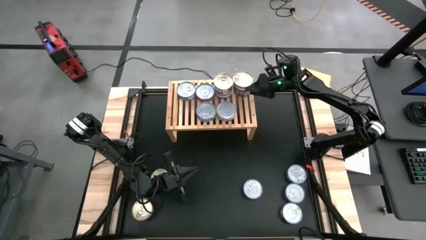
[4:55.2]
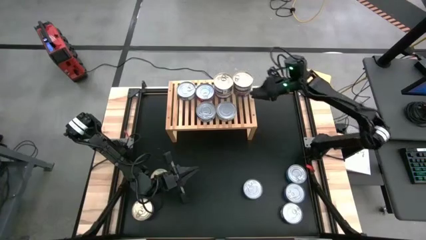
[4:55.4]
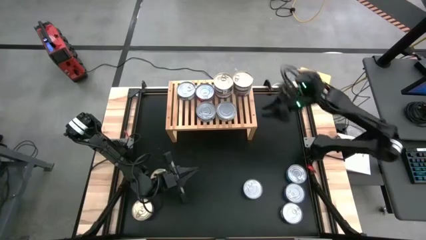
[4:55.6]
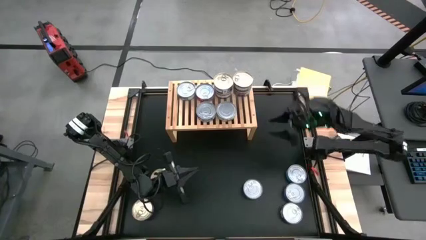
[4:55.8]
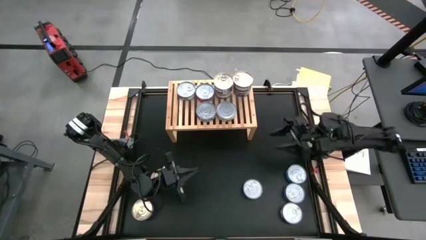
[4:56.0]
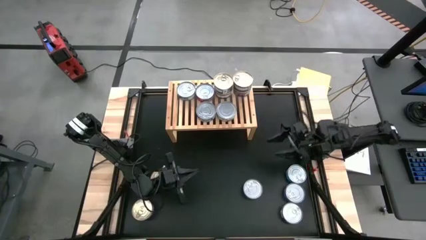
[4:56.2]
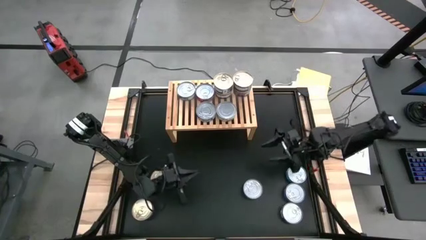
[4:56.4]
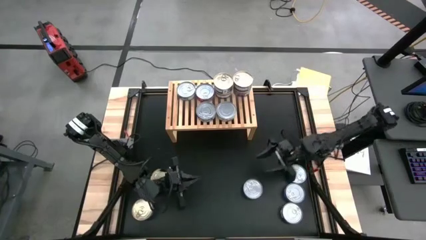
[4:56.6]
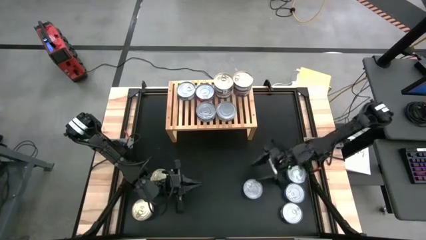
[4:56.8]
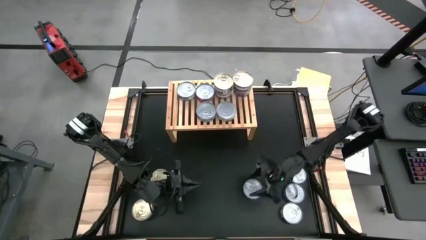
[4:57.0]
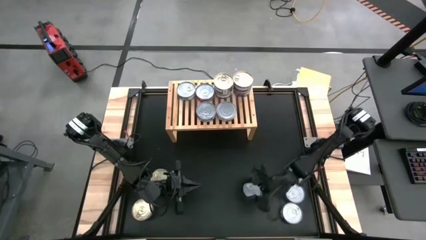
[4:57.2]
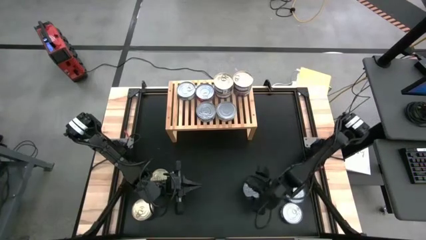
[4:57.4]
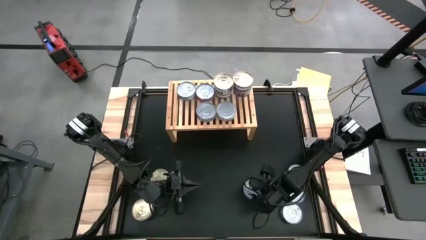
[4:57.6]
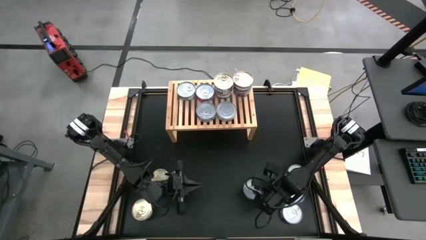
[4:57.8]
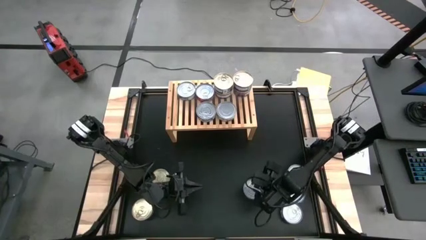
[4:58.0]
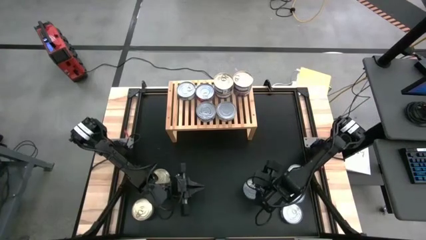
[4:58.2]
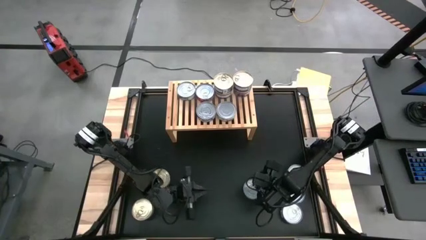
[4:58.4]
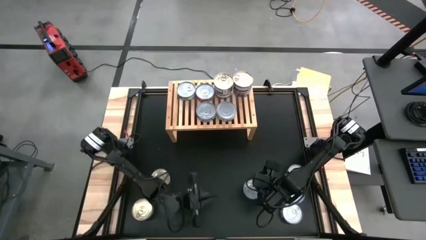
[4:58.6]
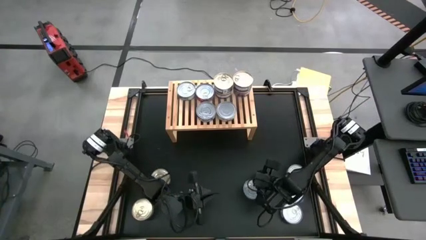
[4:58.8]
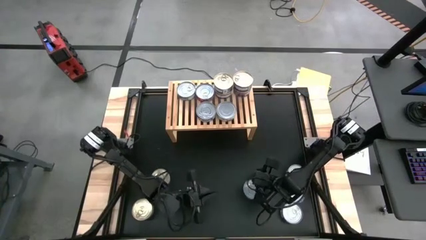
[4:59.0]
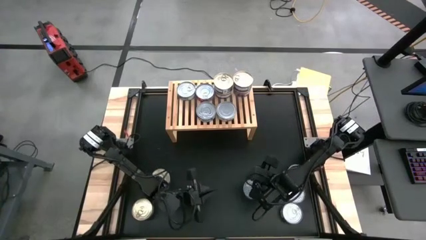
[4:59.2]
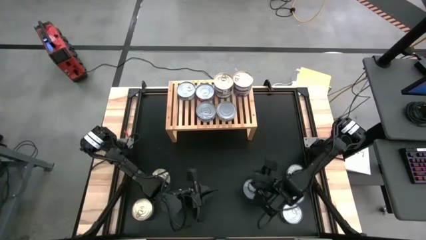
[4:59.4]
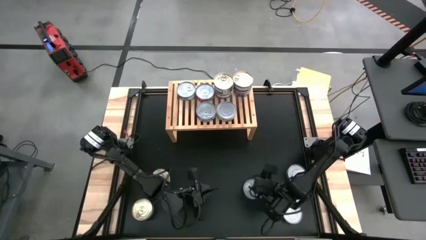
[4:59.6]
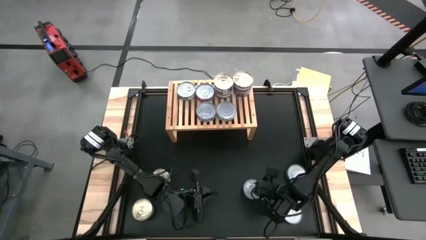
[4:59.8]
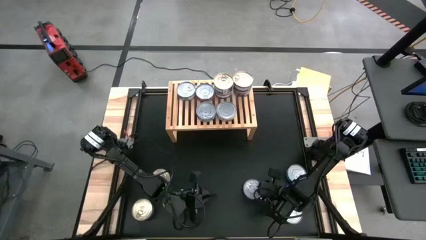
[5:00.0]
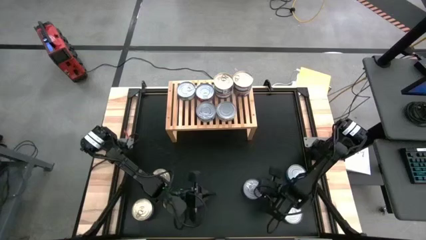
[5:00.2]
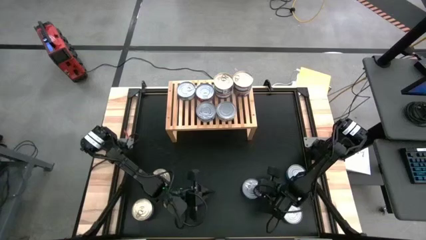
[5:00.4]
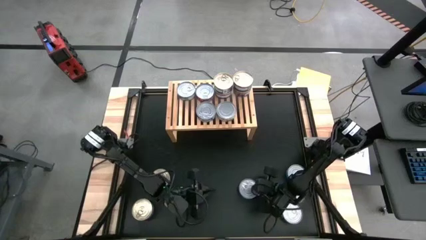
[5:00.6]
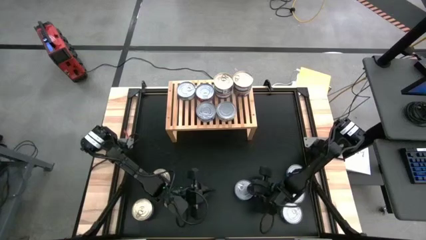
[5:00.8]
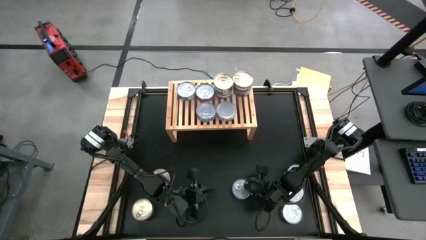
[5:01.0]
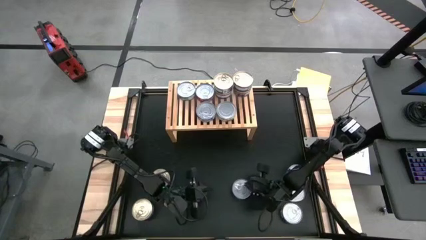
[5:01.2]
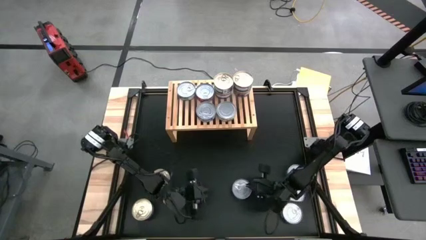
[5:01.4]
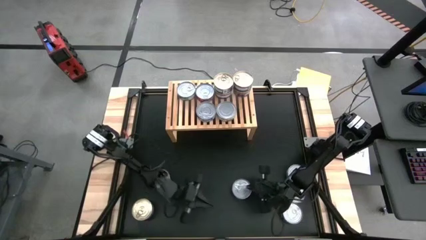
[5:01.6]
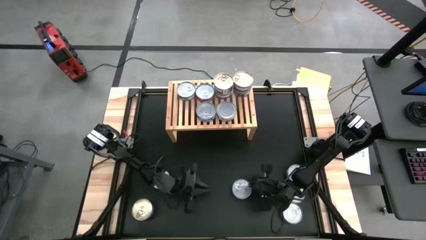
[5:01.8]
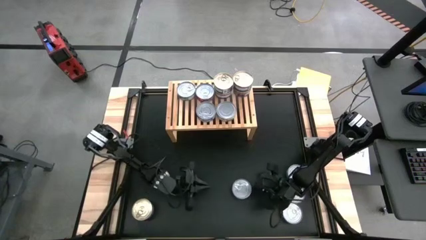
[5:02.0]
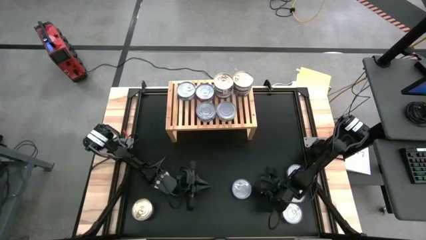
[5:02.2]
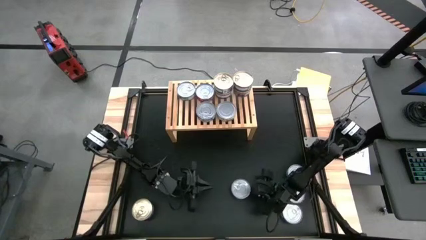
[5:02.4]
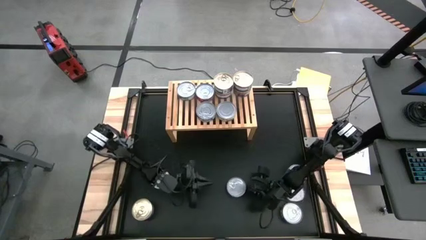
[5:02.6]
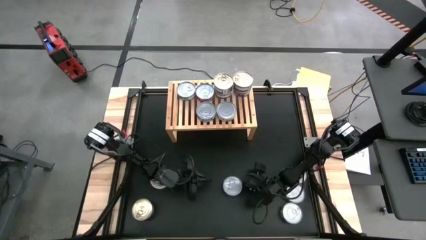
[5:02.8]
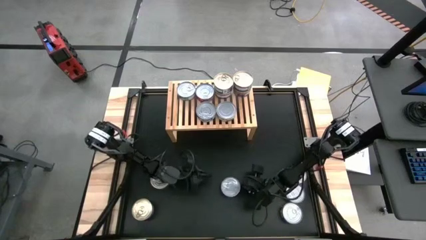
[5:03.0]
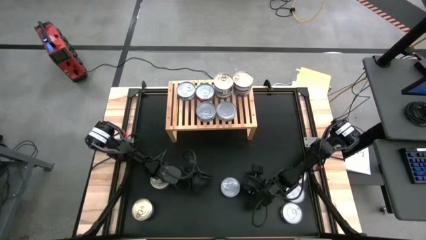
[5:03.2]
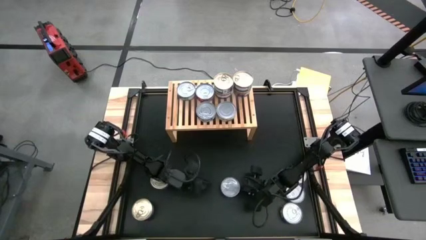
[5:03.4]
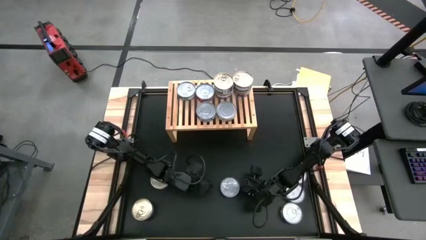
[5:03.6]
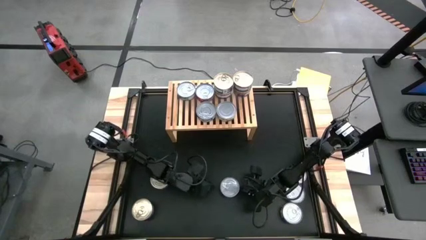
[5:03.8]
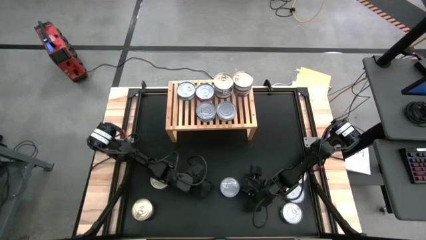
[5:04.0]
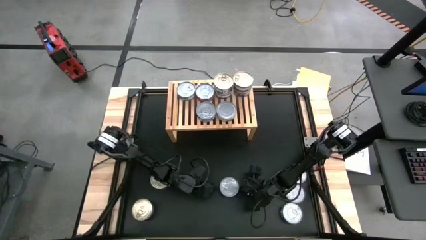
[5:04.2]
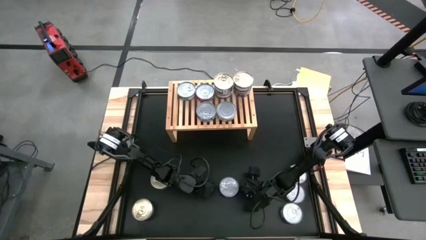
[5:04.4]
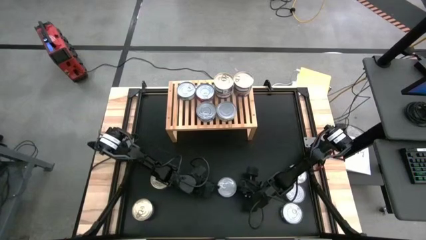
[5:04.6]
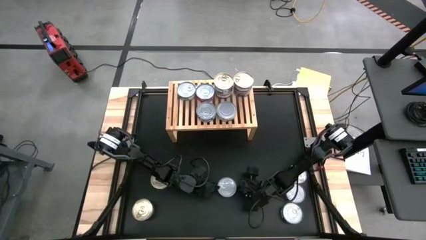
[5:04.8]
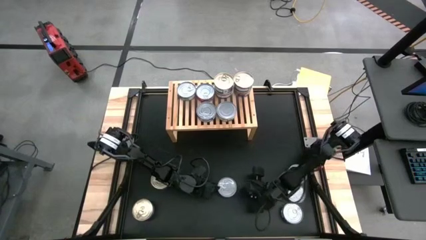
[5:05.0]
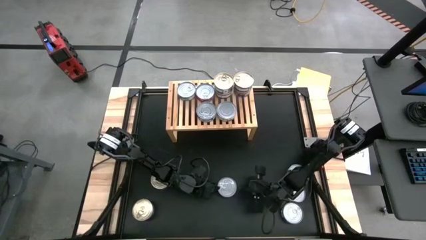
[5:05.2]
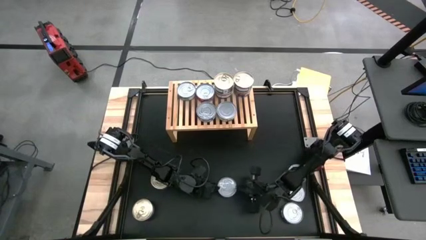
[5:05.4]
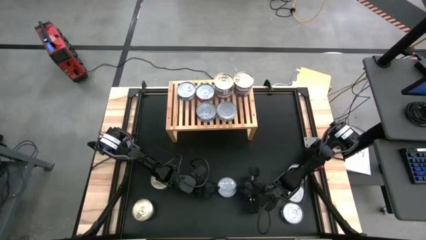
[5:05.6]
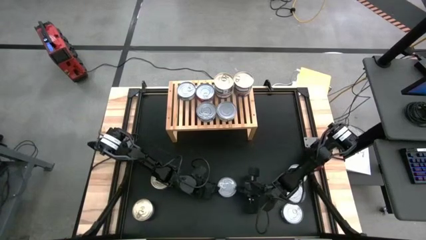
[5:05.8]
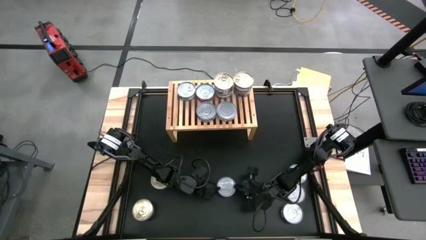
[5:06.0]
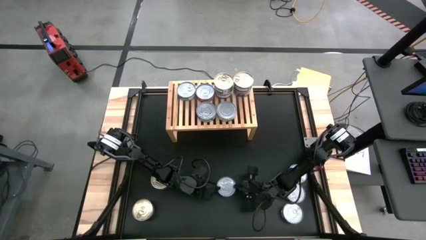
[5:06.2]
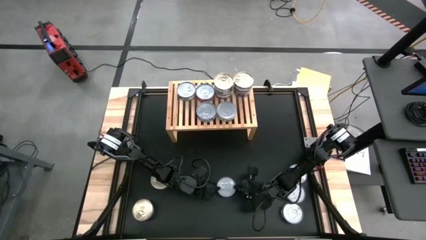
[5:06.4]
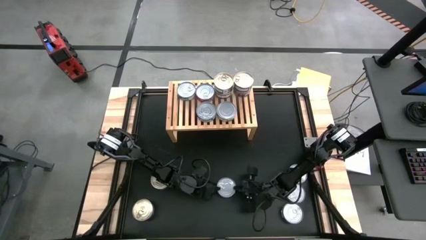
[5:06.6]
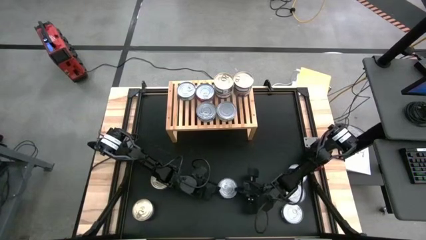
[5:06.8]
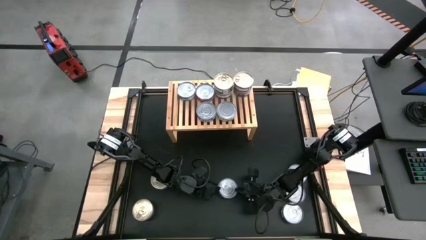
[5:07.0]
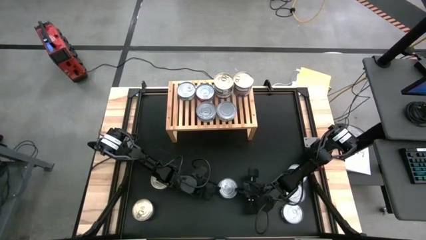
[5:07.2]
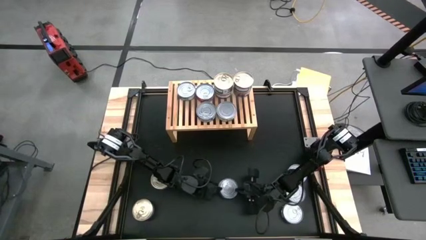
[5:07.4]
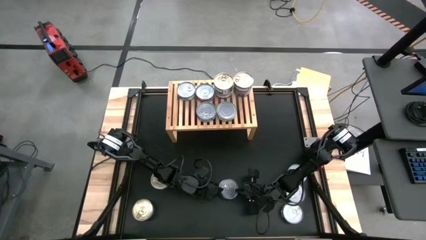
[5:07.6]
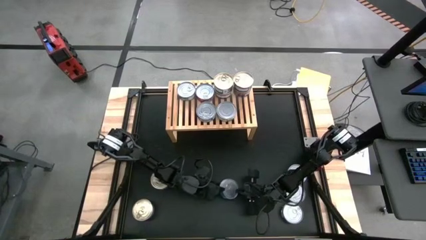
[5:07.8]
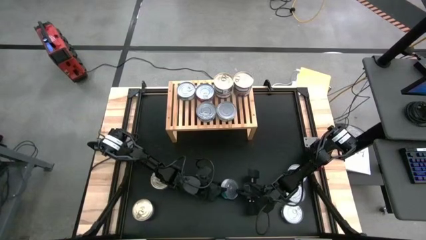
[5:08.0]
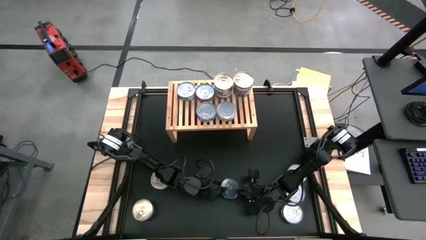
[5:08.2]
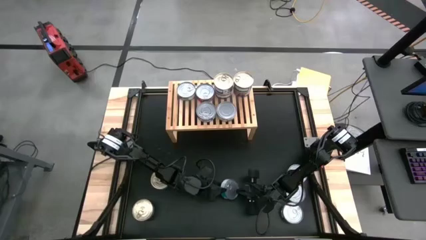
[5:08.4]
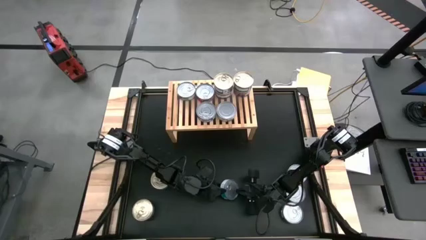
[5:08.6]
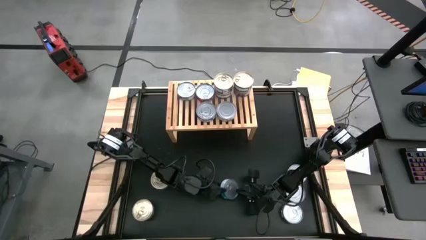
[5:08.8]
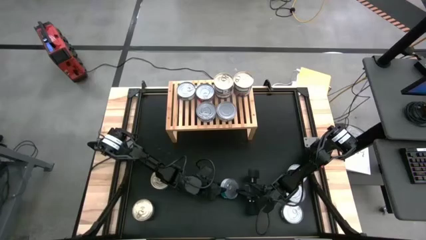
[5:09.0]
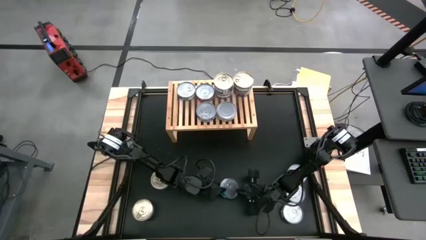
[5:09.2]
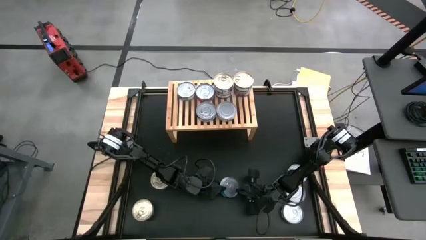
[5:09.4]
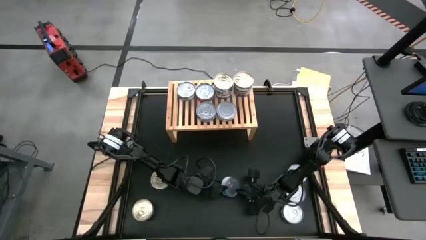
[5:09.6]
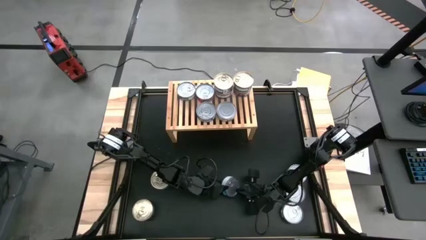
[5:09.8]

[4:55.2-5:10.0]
Task: Stack canned seafood by type on shelf
Put the light green tuna can on the shelf aligned with the other green tuna can
